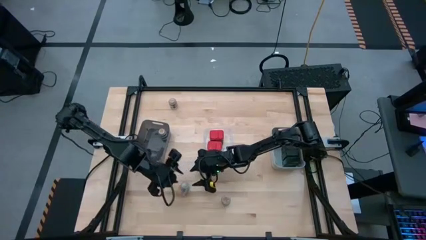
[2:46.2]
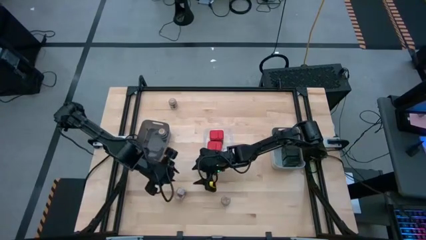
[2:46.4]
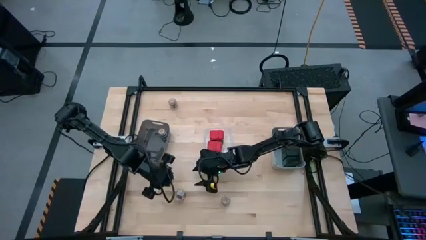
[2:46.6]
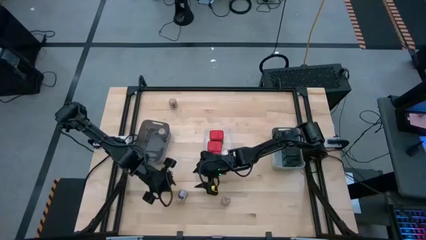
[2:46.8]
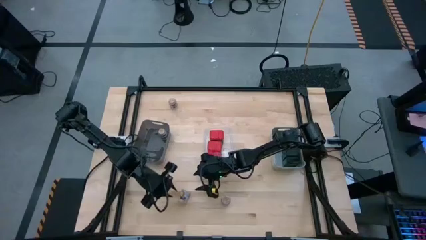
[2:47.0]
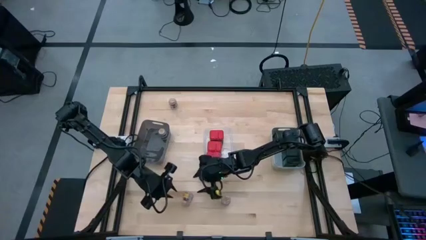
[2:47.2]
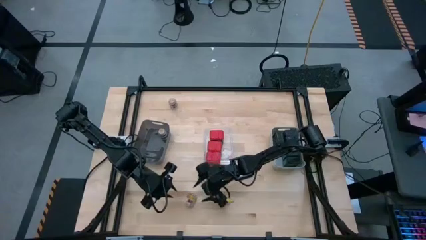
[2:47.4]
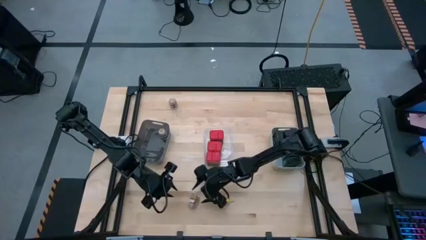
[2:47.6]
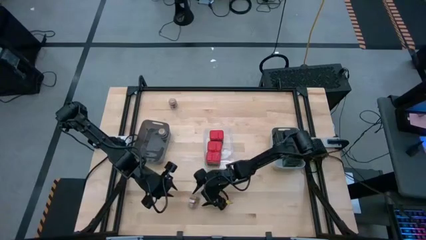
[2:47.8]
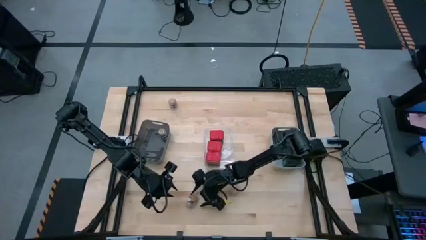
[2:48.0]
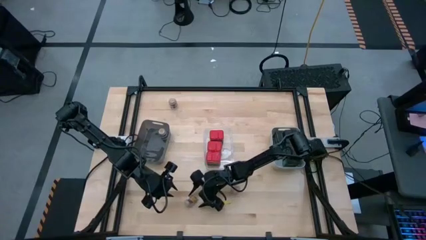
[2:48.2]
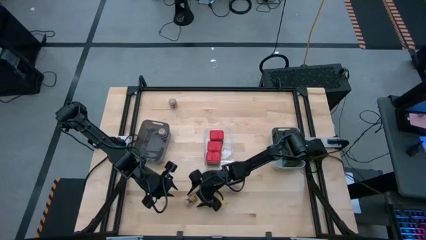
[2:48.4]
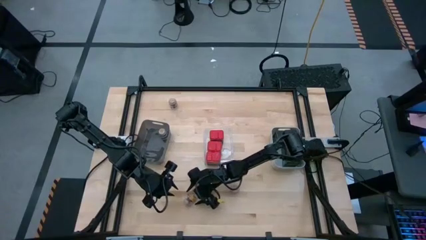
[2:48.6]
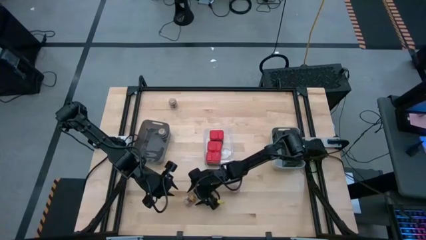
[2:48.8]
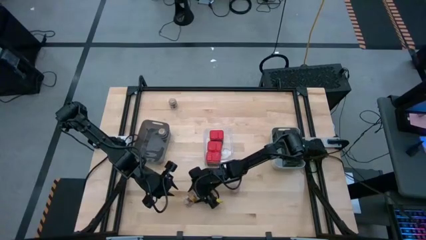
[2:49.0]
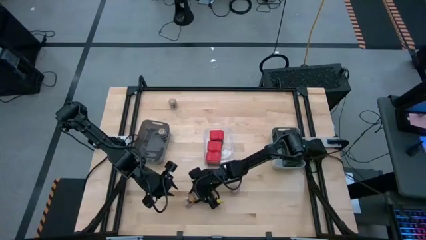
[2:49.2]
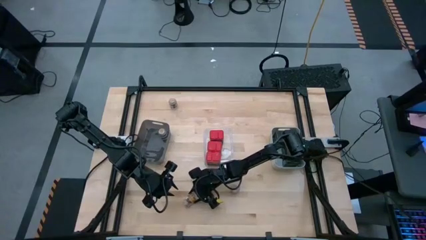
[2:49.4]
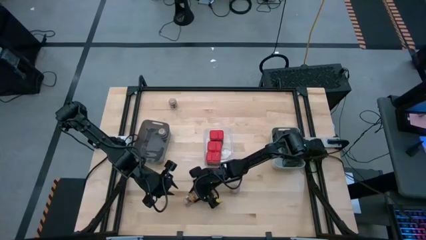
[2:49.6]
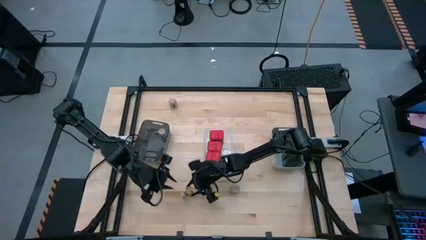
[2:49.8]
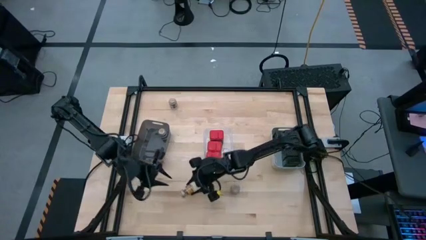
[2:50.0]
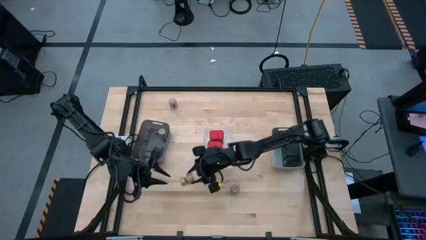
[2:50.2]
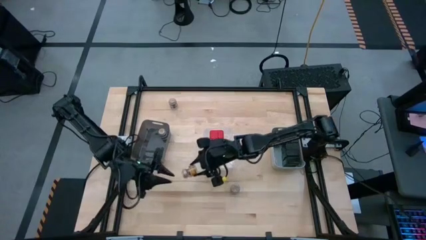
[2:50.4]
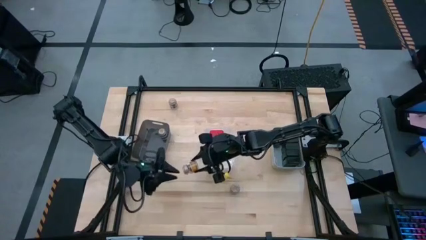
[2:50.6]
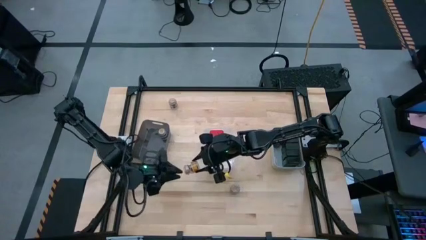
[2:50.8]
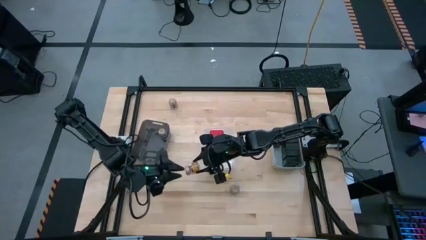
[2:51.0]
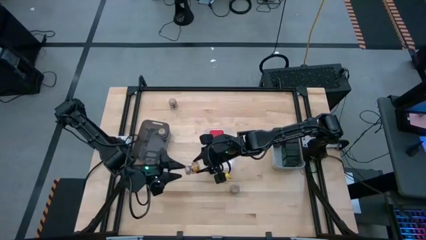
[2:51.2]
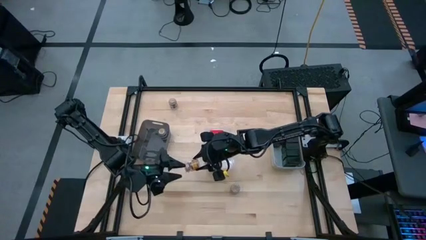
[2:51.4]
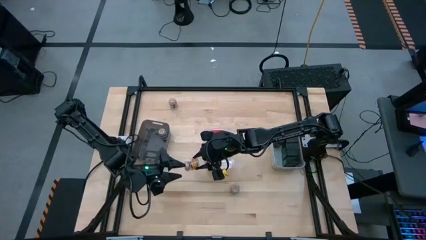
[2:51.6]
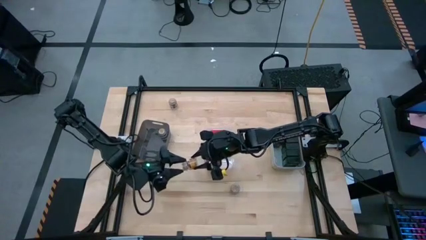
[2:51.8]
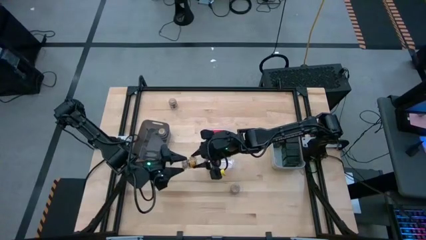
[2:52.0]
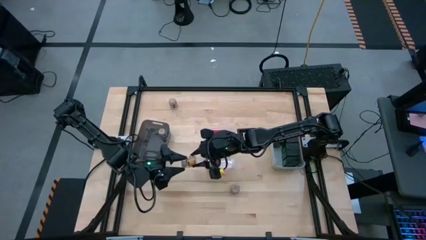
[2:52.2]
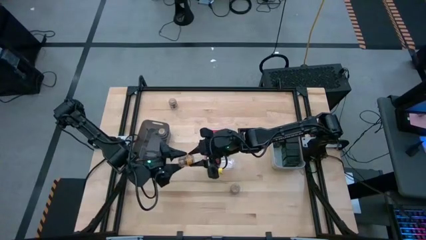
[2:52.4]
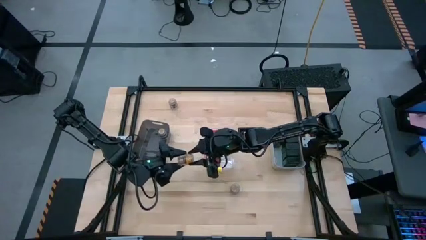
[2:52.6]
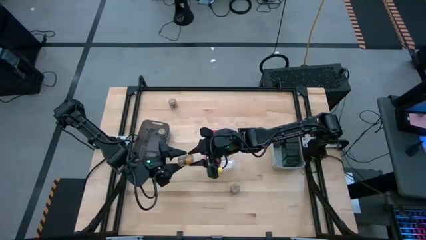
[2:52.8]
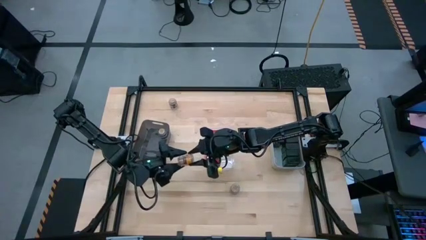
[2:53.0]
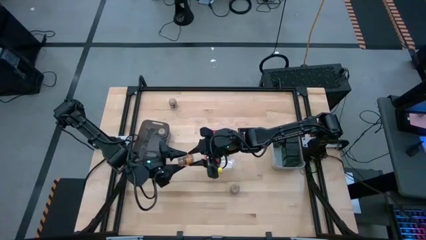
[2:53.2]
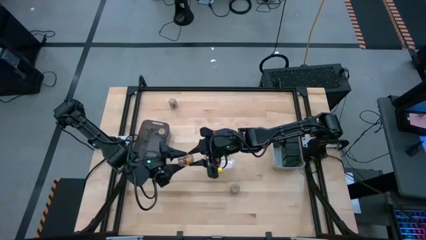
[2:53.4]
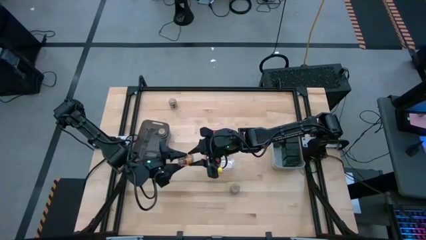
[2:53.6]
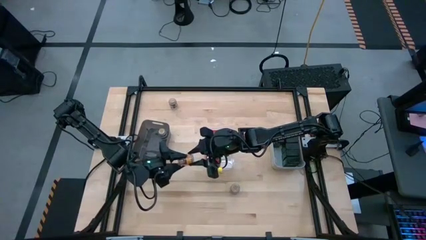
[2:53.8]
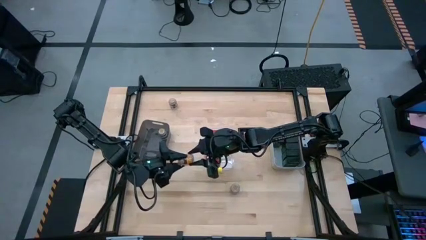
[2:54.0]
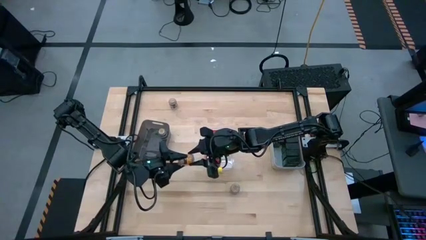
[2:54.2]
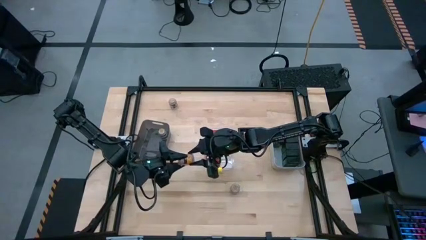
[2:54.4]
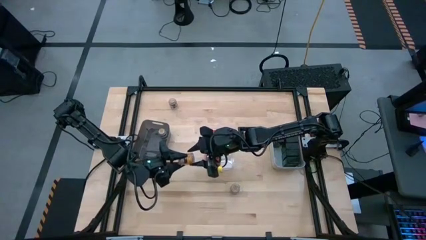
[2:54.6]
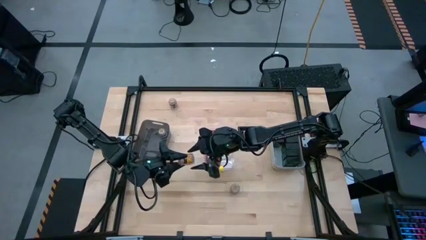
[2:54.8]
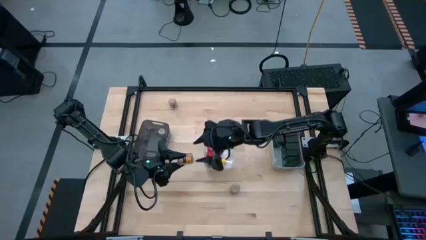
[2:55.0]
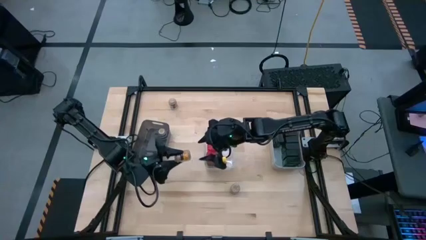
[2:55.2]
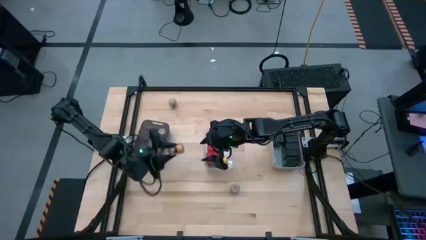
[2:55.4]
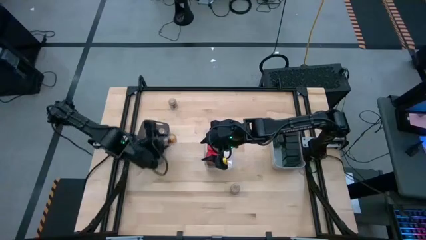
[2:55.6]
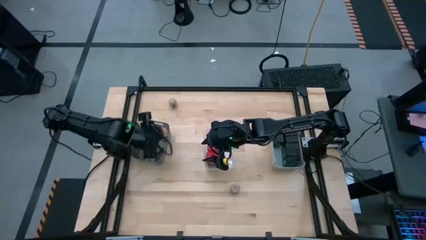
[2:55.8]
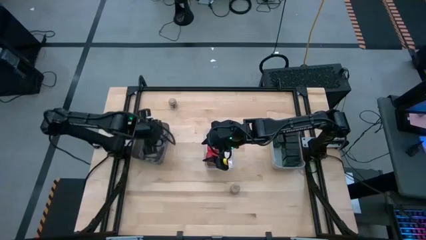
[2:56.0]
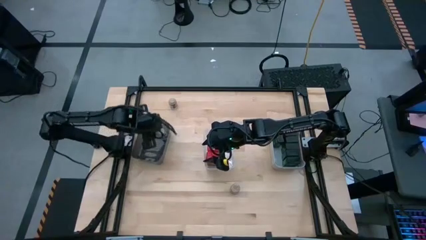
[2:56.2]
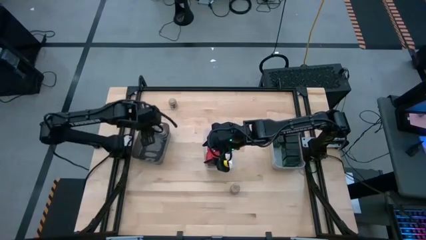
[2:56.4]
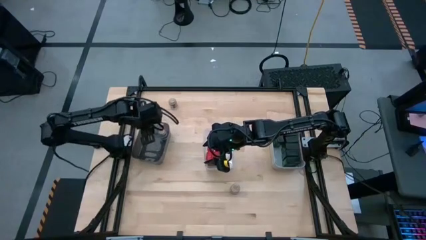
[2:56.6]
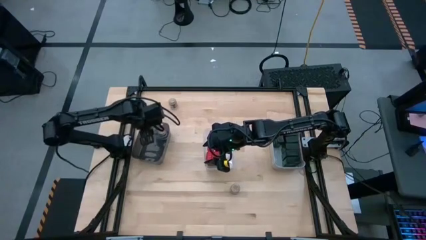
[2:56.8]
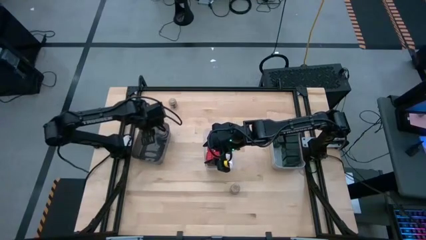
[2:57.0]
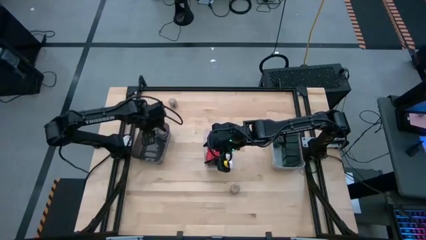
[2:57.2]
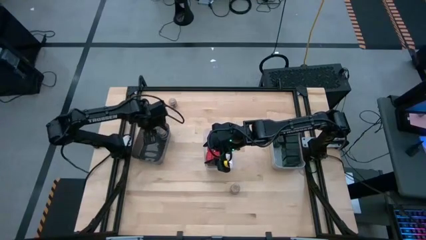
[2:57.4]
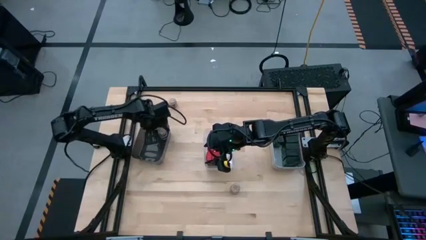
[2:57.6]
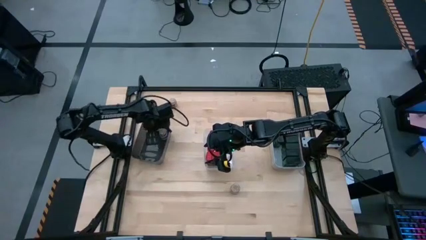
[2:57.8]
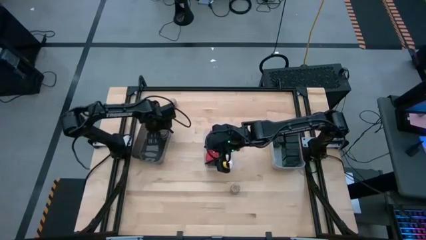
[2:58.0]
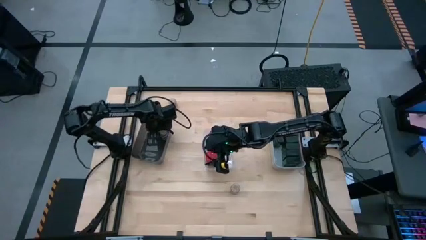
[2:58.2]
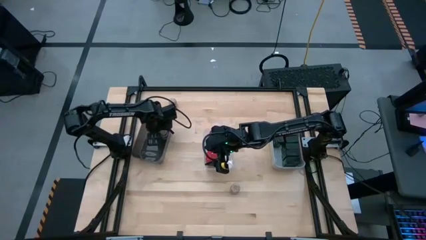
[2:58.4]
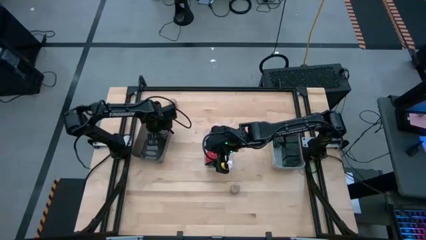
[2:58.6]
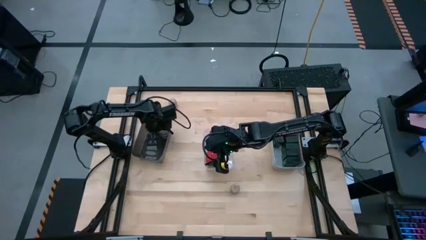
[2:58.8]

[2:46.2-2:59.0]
Task: Sort spices by type
Put the brown seasoning bottle into the black bin
